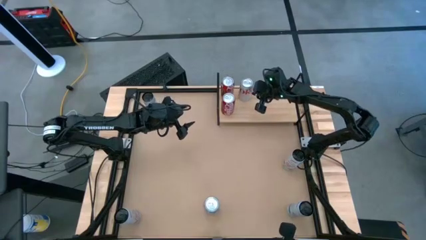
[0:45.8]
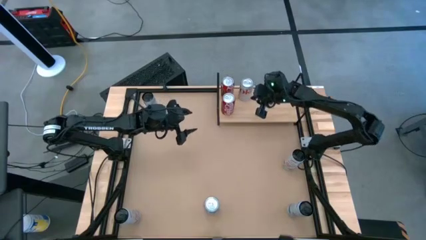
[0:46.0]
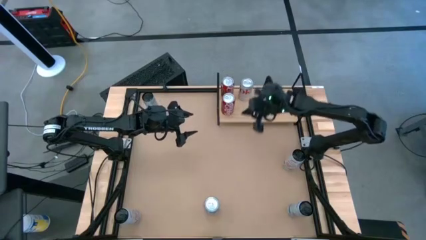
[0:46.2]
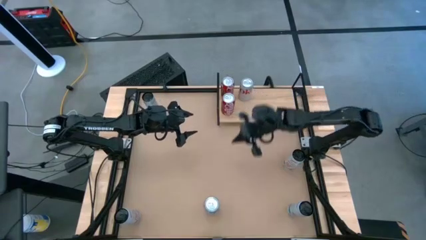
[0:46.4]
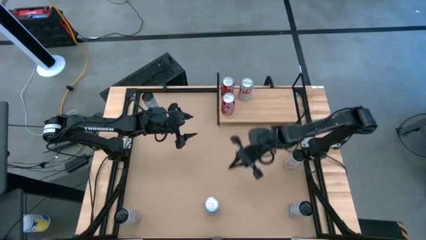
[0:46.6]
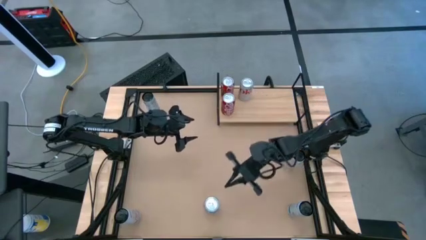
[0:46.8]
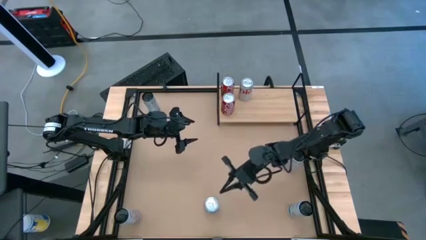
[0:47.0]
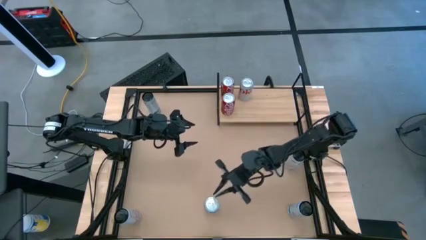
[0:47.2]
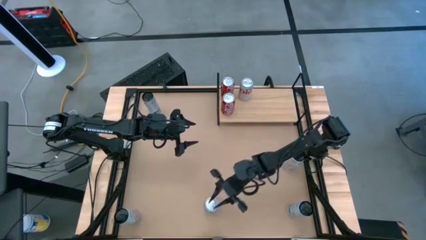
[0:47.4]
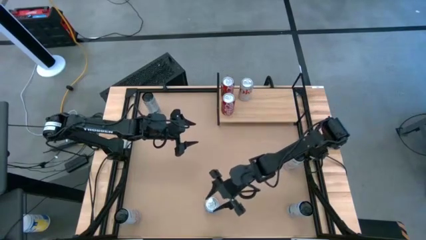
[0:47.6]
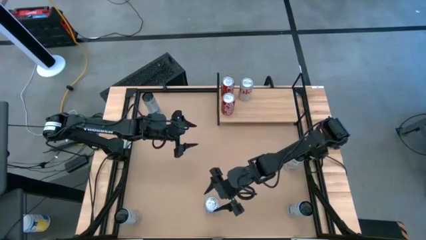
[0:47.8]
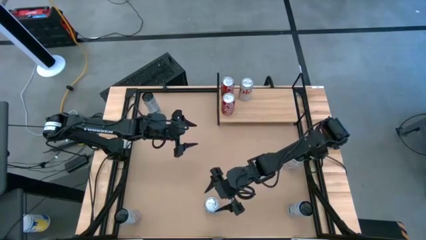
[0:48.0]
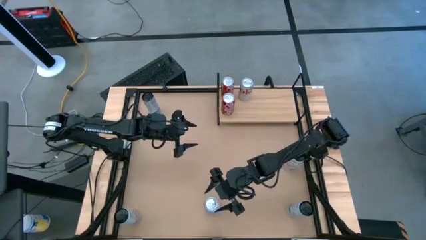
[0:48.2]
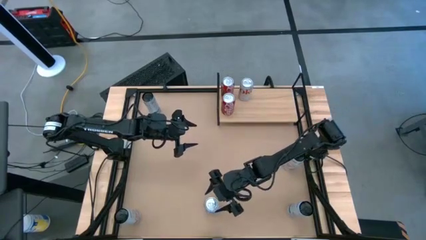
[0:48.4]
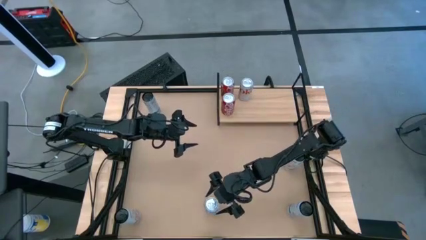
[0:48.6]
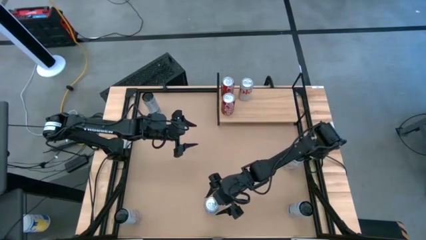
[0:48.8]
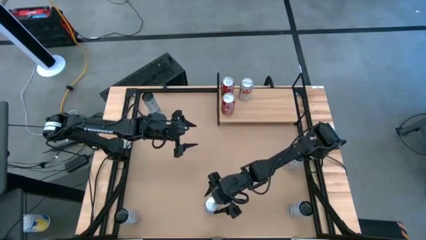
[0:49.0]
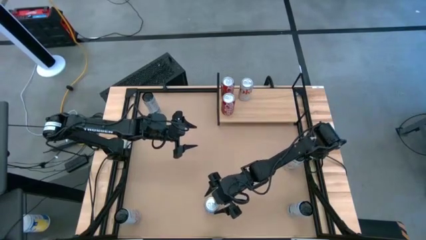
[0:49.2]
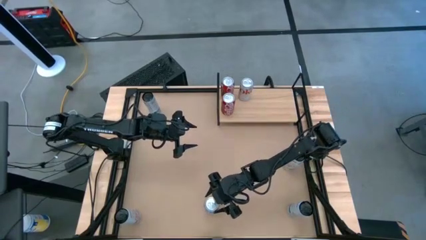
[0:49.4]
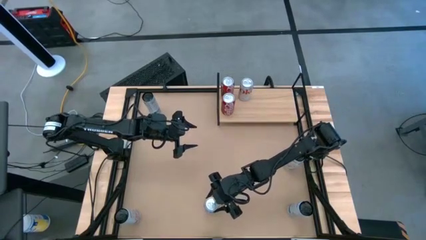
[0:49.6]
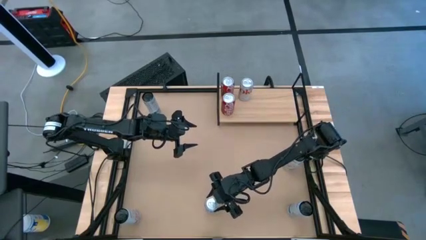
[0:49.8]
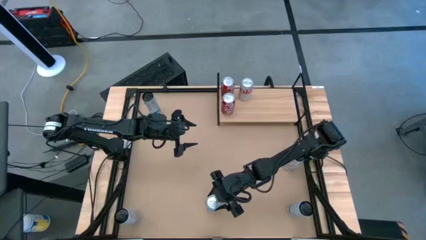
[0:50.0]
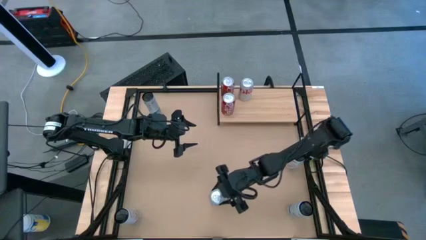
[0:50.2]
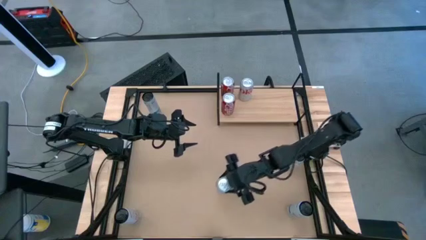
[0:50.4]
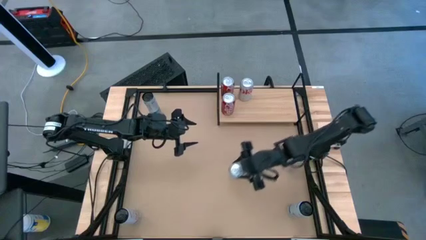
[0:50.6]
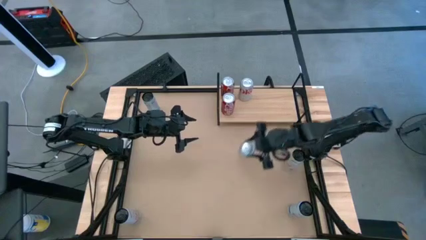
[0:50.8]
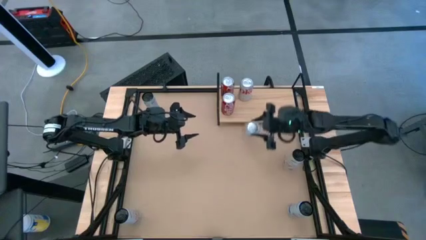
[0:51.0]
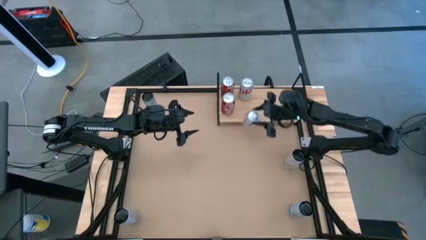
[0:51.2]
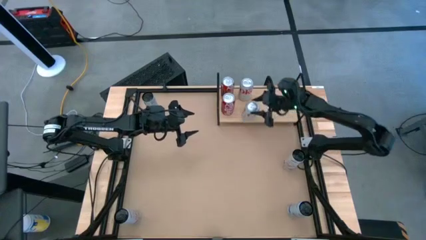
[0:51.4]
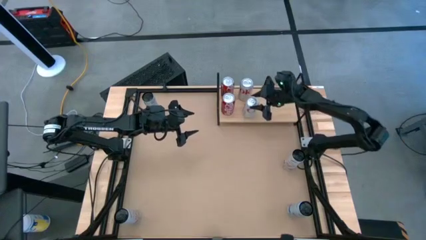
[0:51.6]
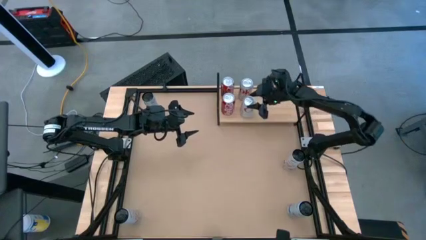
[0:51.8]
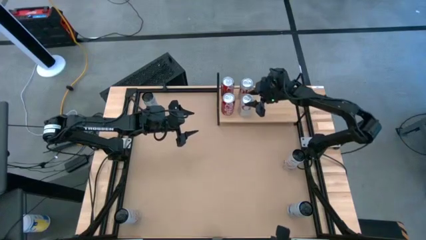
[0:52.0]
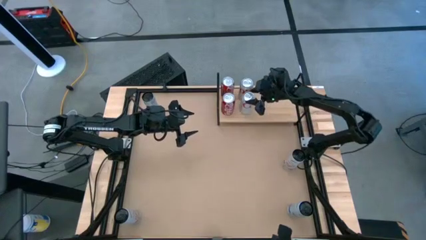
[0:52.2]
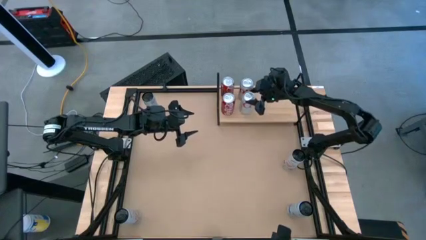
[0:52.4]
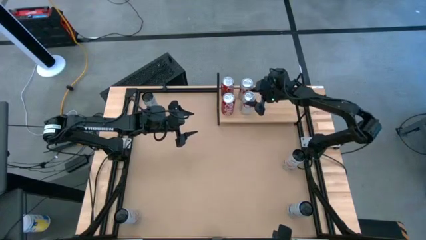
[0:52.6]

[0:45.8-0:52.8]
Task: Place canned beverage on shelf
Put the silver soda can on the shelf aligned with the other silver soda can

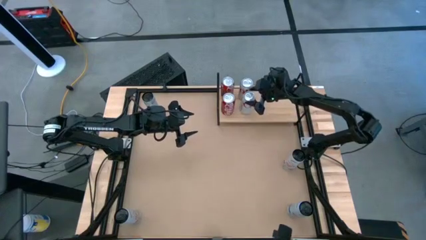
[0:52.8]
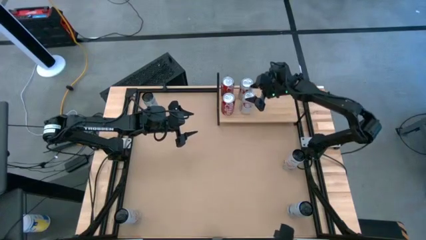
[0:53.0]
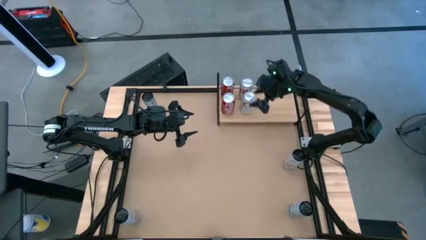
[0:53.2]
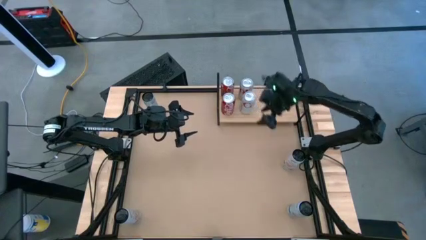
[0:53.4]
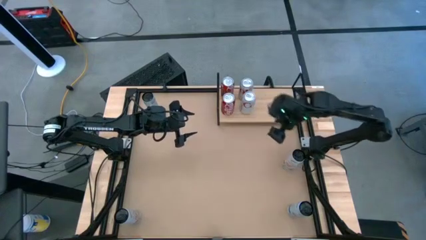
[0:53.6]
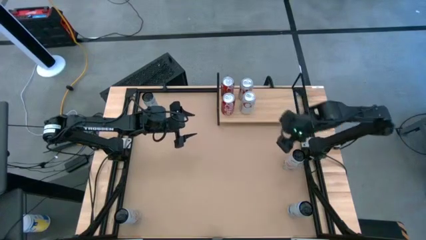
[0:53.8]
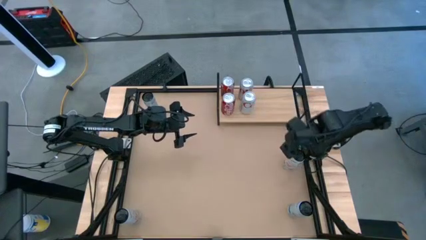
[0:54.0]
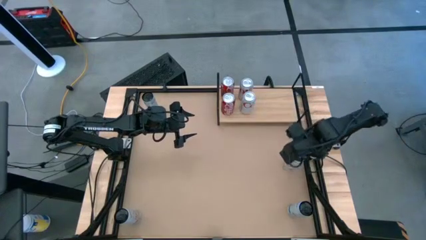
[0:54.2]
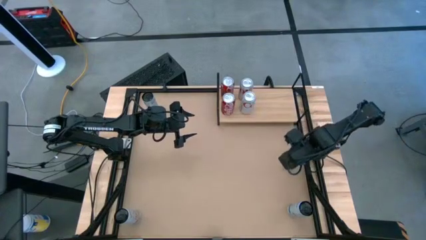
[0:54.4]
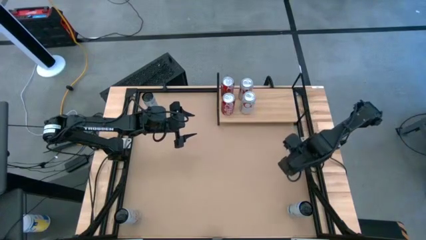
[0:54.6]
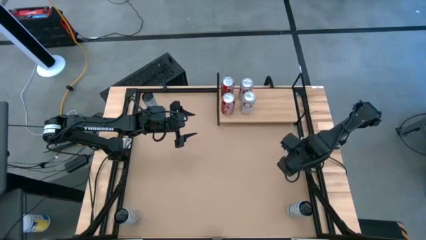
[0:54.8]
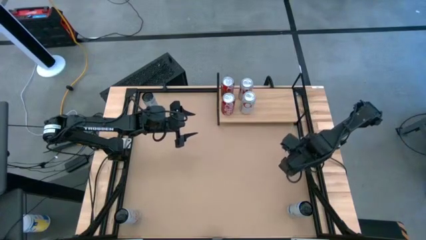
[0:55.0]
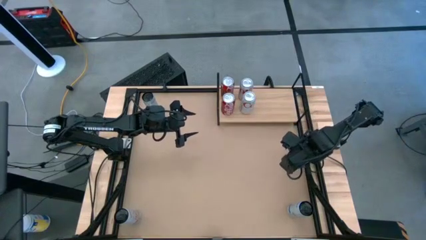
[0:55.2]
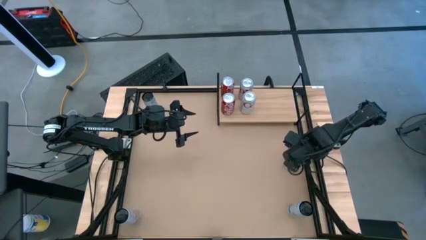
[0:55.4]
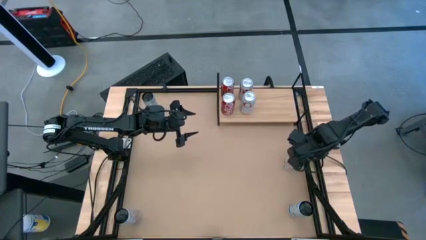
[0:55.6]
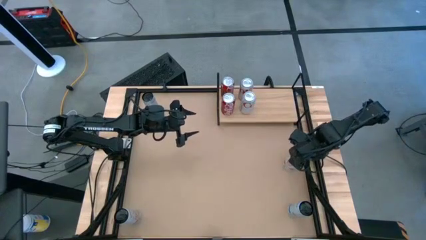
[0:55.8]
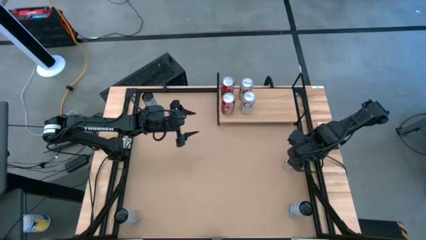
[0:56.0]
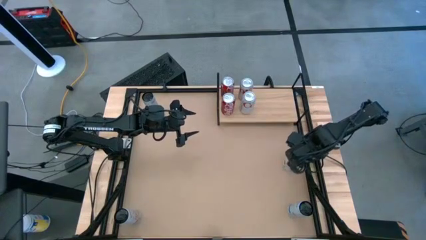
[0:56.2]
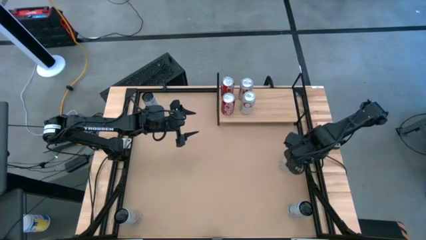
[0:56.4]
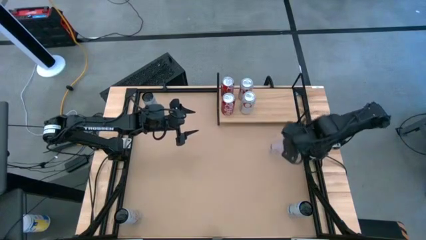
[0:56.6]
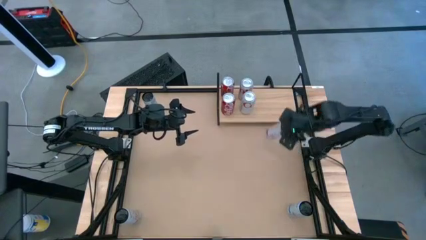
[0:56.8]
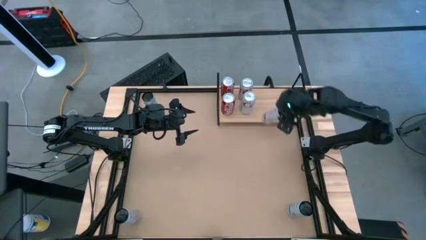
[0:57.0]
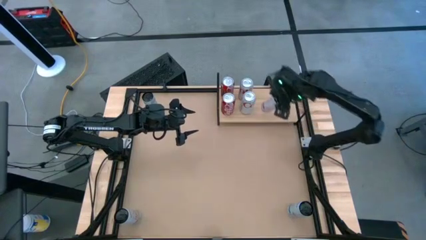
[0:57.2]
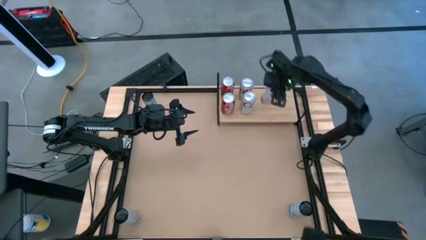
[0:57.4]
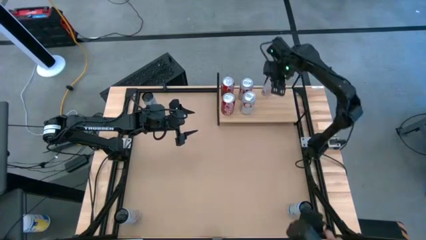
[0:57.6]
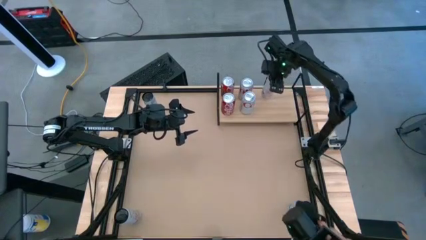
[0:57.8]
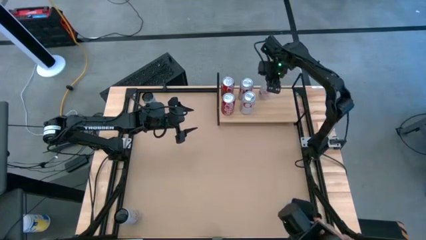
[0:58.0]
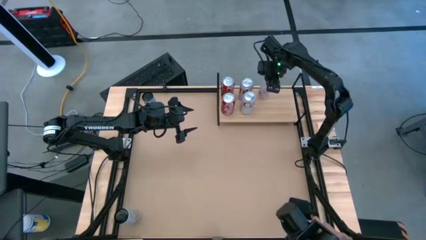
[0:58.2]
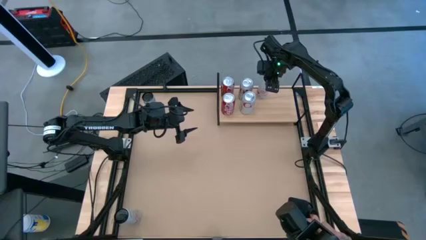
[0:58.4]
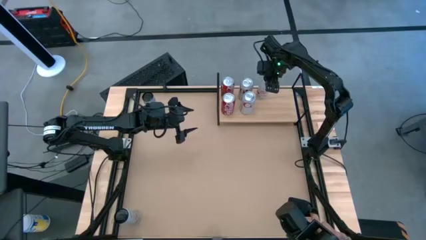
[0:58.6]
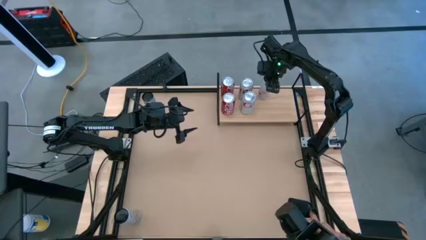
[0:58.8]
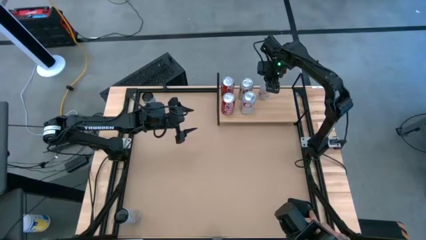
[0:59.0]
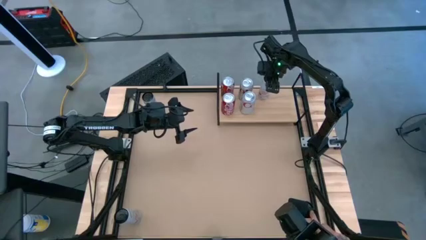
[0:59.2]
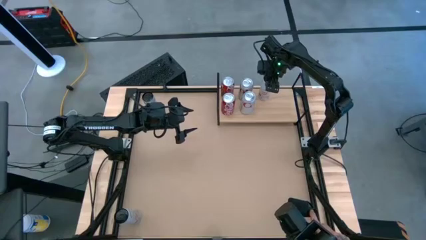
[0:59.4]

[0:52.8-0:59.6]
Put the right orange white soda can on the shelf
